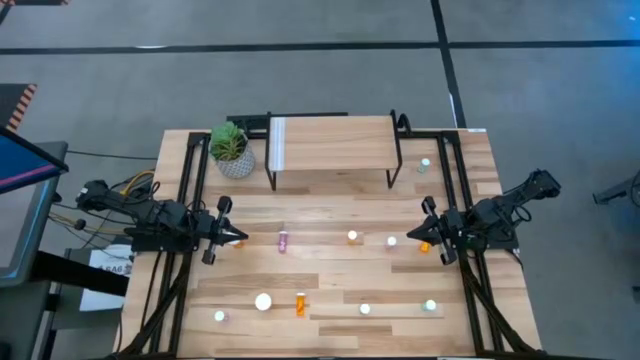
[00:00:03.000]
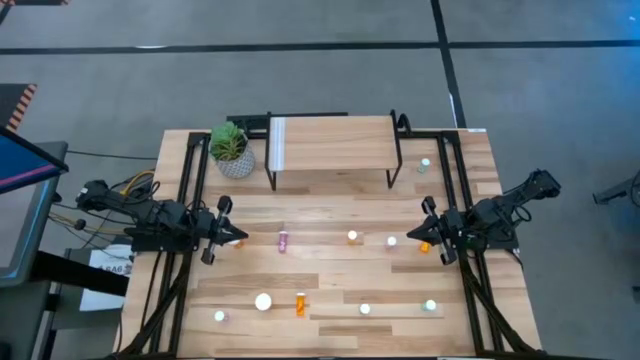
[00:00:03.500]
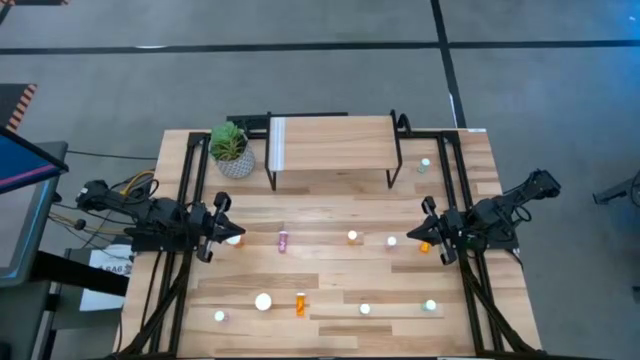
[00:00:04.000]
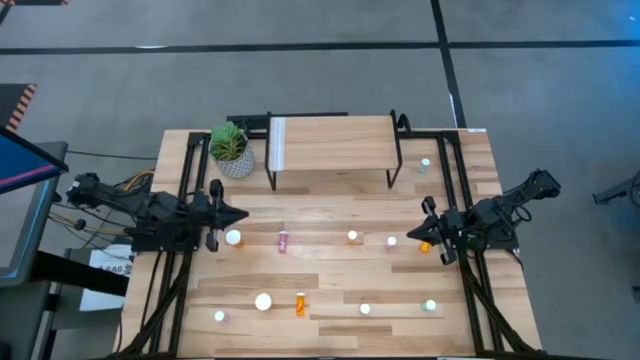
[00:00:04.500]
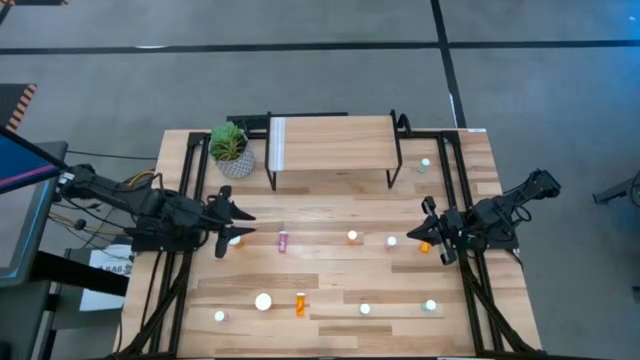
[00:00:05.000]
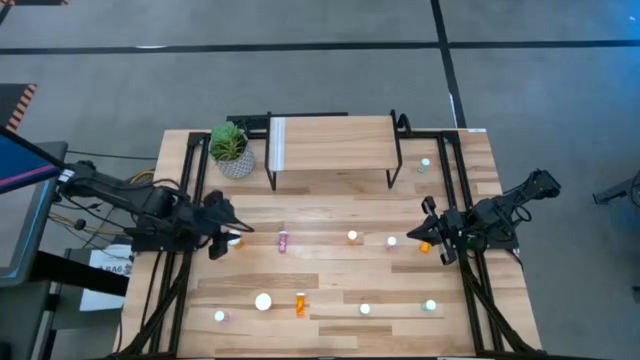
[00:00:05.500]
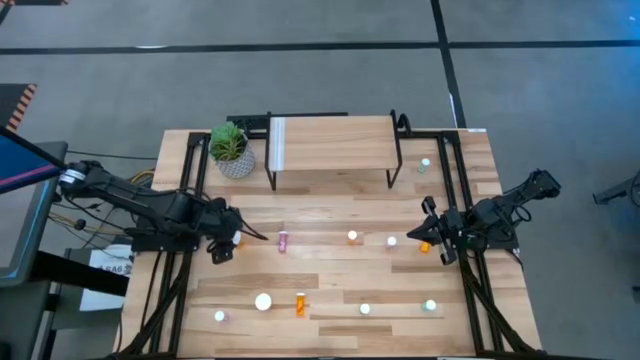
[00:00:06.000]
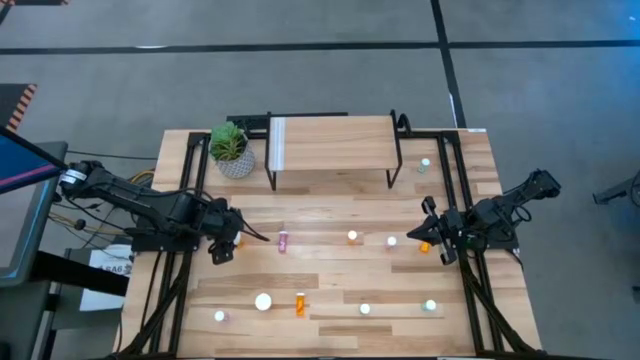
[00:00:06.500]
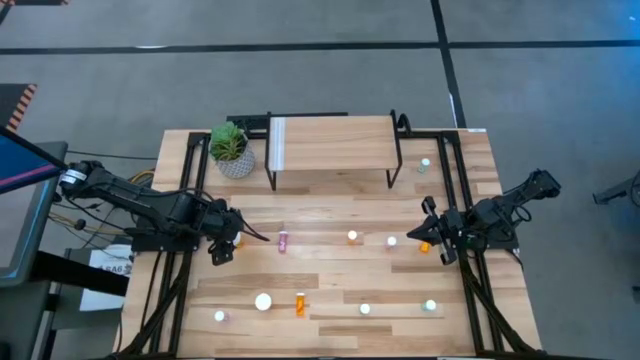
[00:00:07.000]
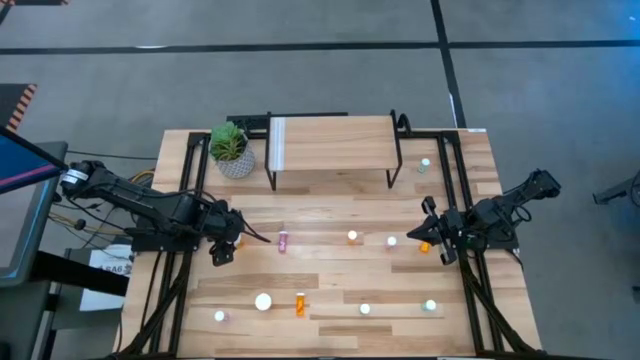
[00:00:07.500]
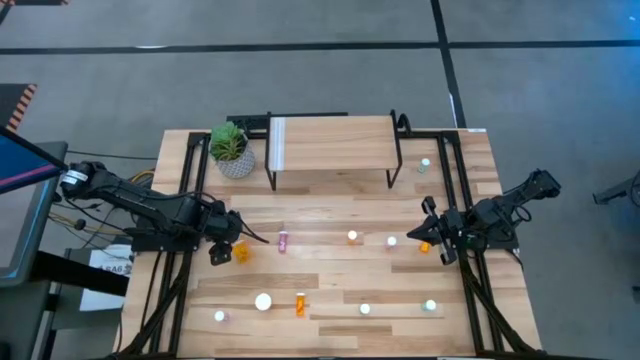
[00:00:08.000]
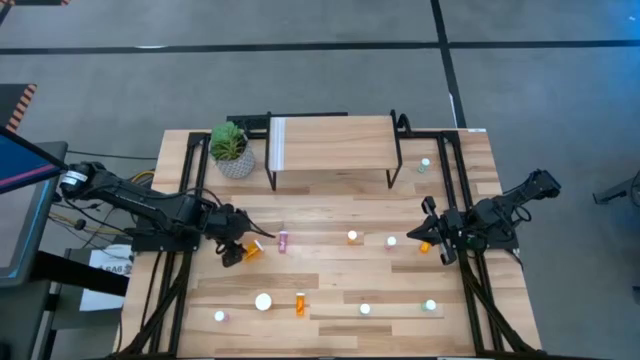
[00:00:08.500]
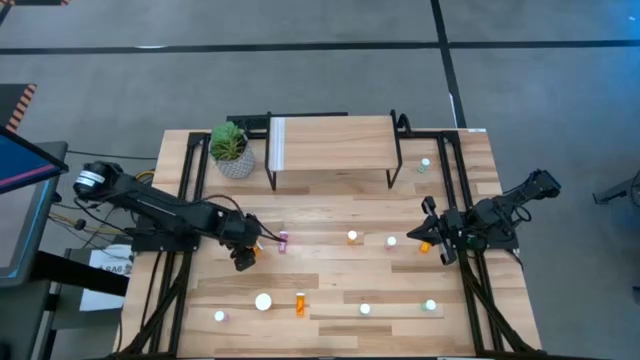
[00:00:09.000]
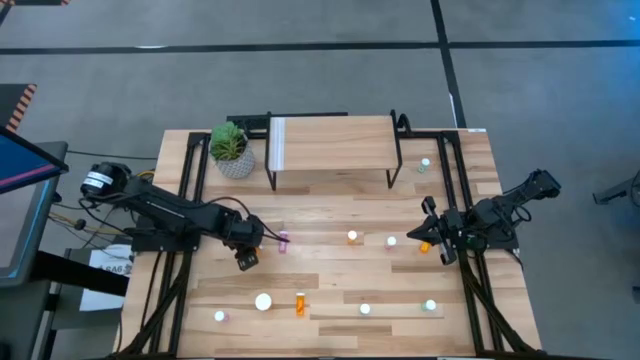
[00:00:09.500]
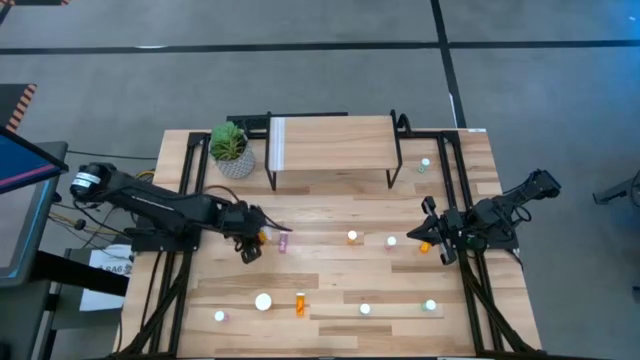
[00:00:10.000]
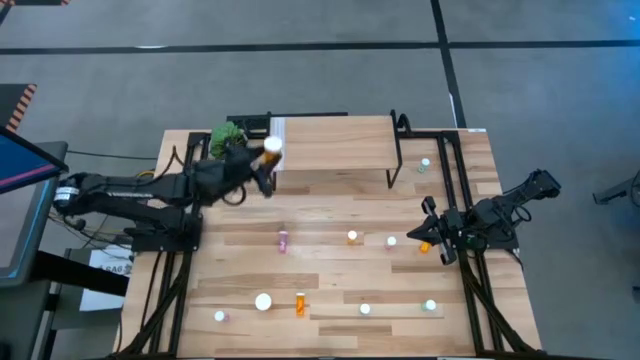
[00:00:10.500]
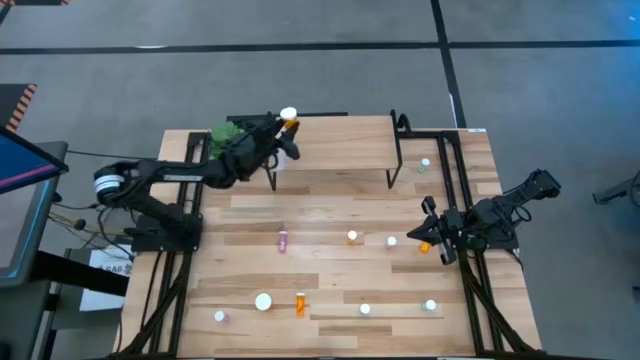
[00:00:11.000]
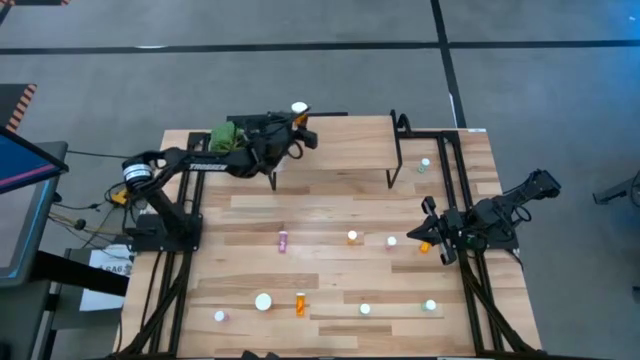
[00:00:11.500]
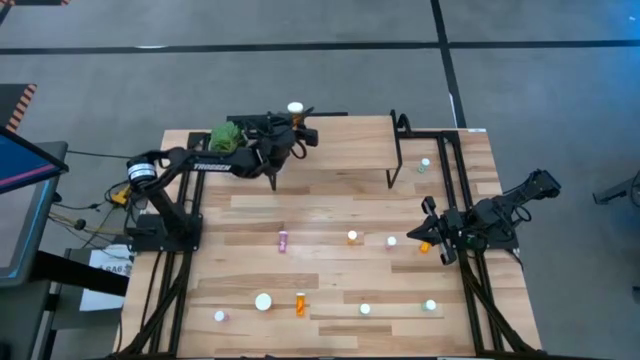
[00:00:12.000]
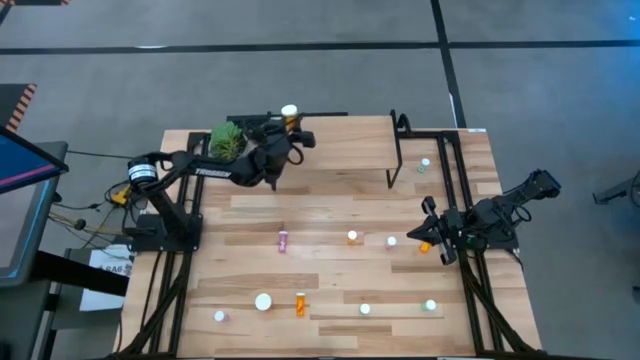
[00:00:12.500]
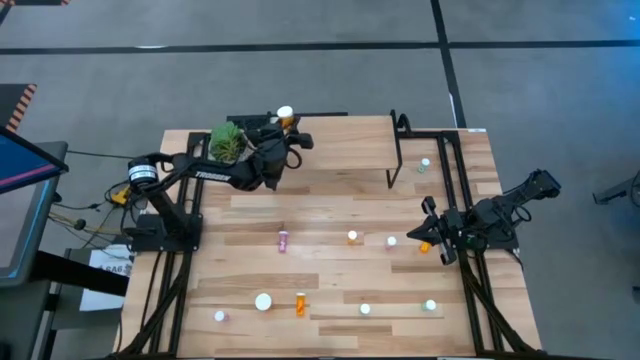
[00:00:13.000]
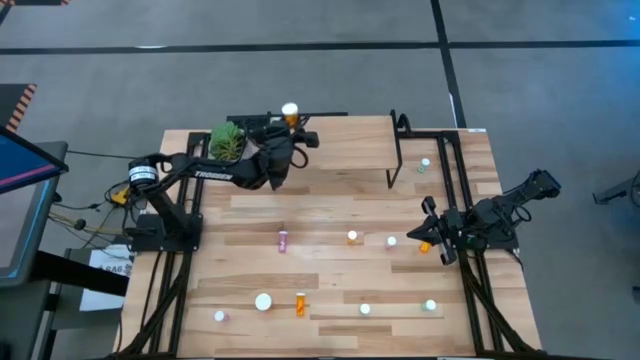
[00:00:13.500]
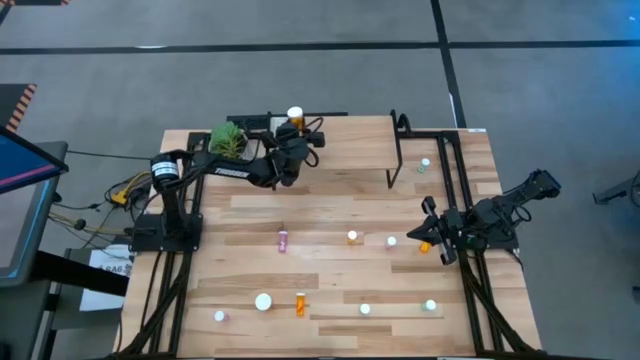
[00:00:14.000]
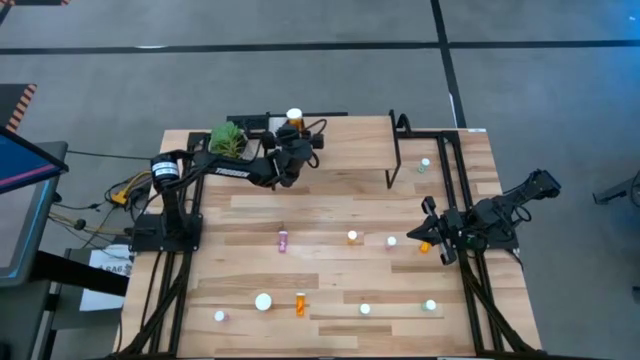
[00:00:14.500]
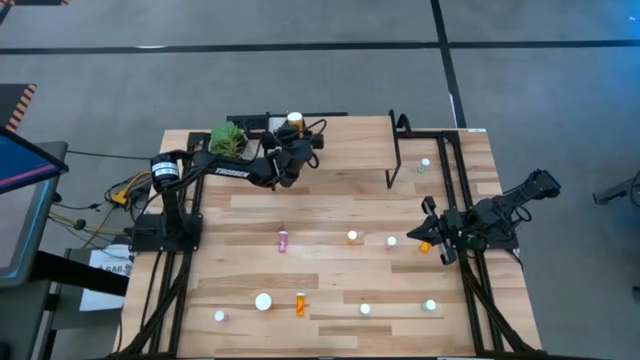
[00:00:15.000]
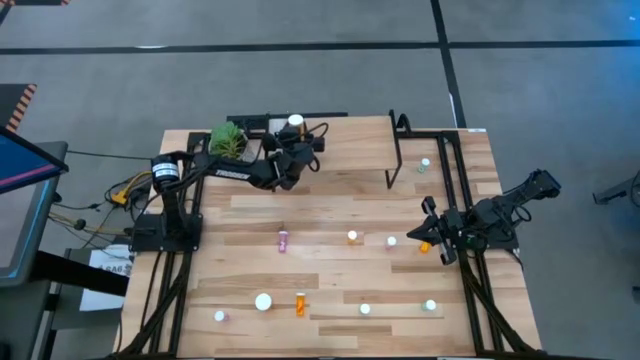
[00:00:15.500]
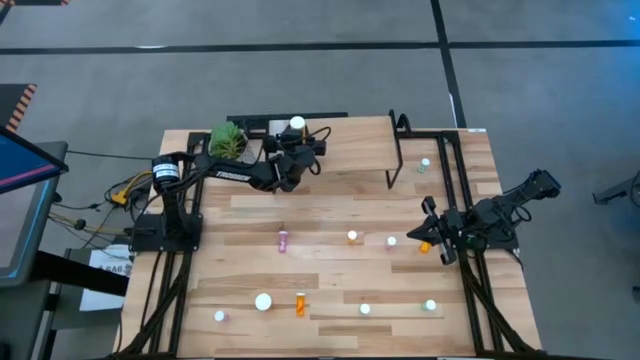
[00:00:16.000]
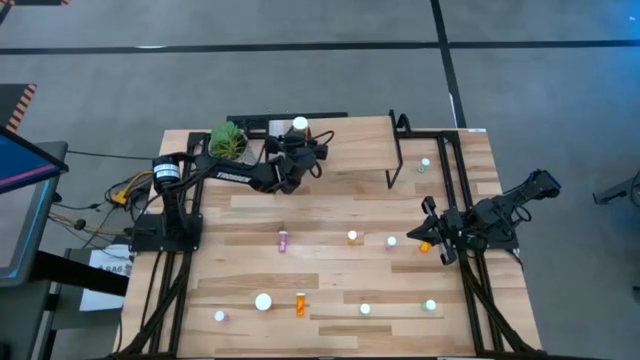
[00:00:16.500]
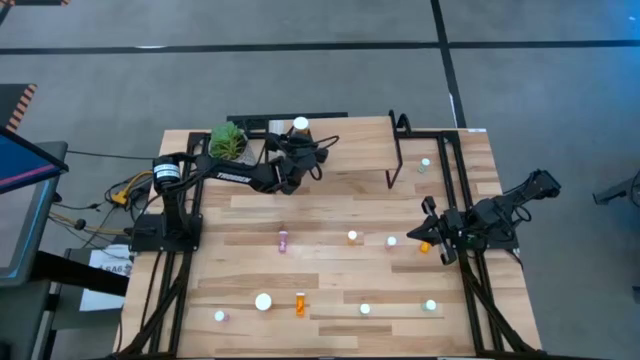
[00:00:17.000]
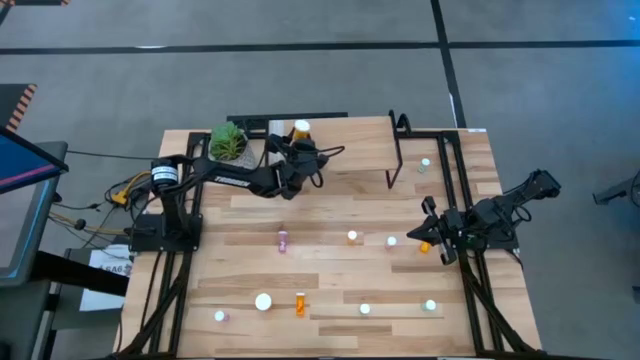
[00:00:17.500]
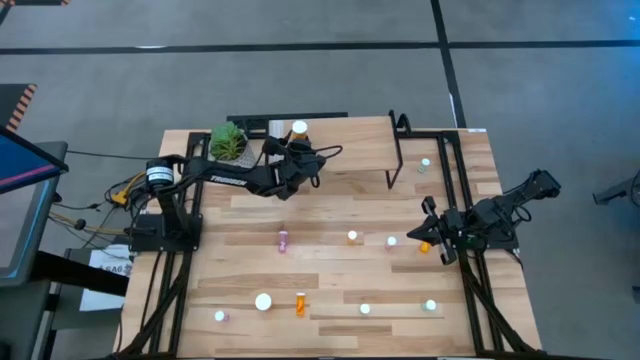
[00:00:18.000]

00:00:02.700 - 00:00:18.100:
Task: Pick and place medicine bottles onto shelf by color
Put the big orange pill bottle on the shelf

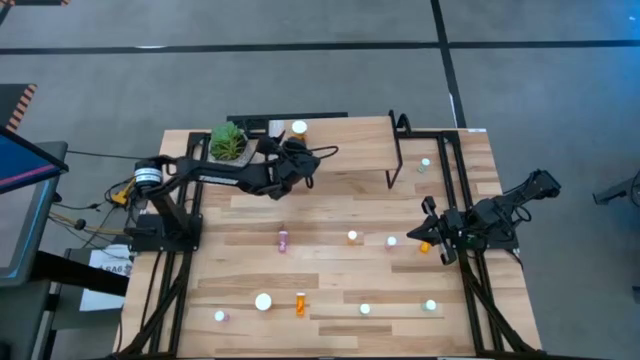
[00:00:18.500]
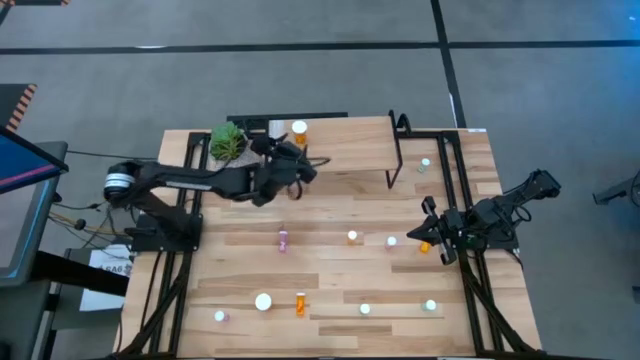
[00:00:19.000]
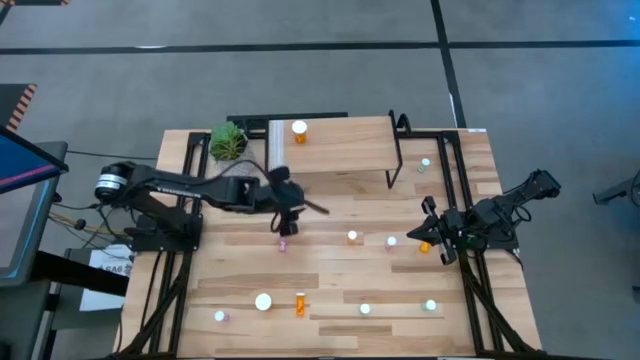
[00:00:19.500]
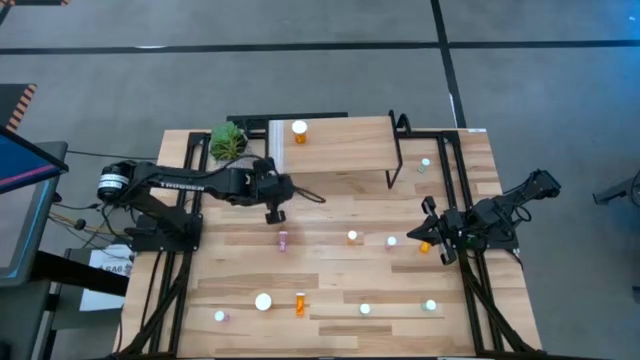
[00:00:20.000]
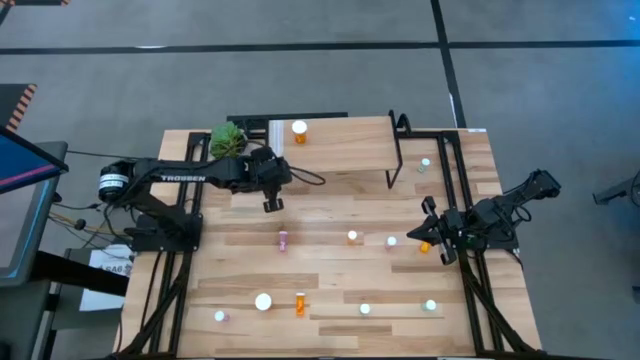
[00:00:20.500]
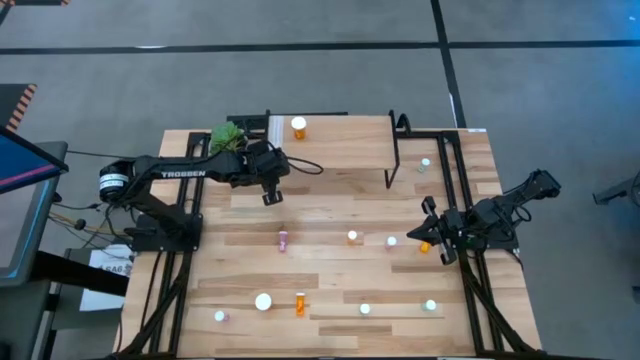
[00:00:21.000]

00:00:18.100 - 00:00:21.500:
Adjust the shelf

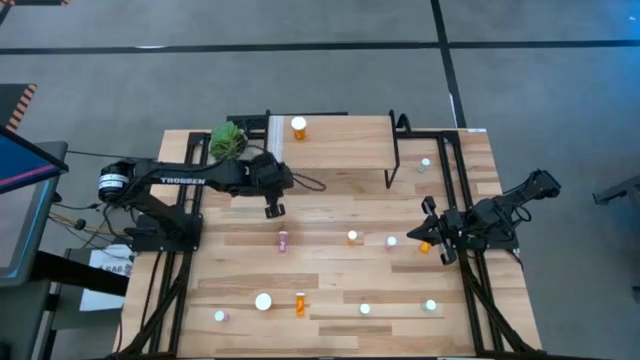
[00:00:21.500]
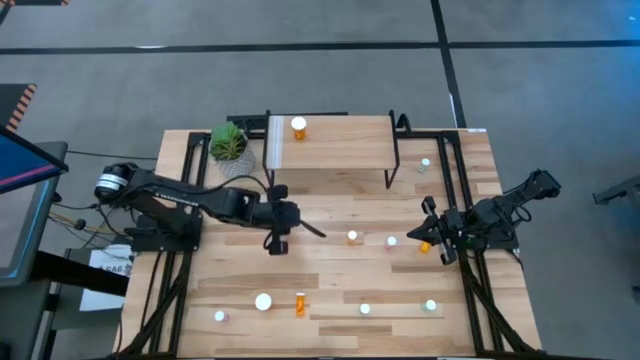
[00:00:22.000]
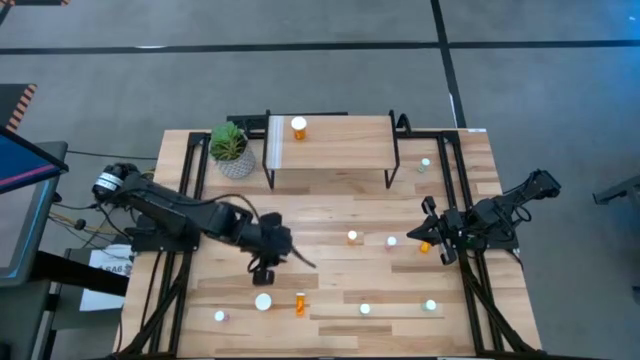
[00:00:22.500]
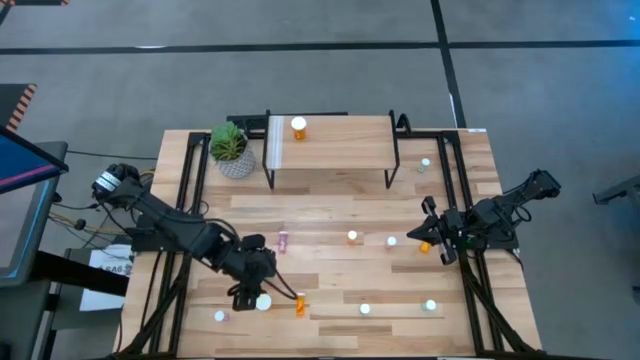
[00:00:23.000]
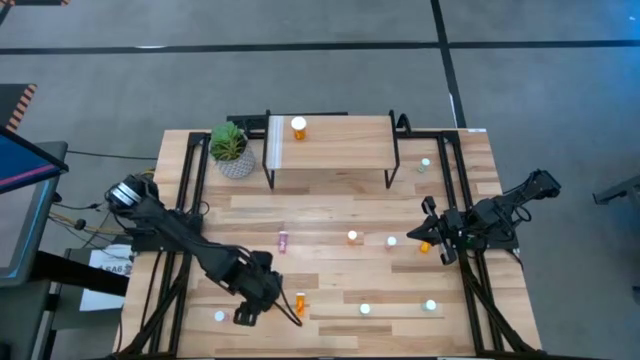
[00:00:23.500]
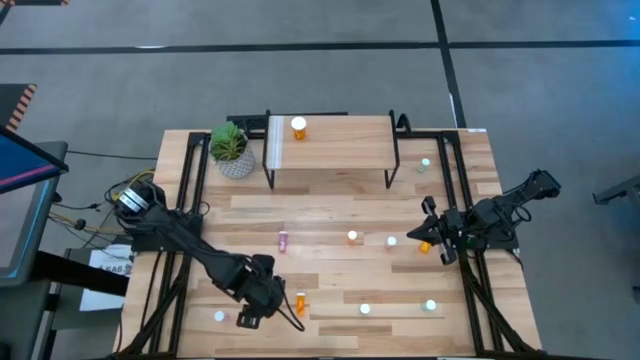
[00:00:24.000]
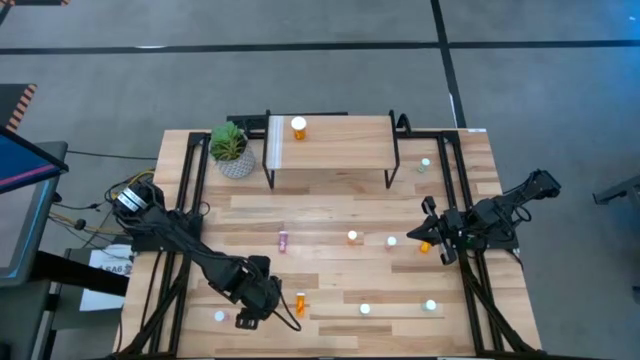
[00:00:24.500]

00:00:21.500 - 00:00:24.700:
Put the big orange pill bottle on the shelf aligned with the other big orange pill bottle
